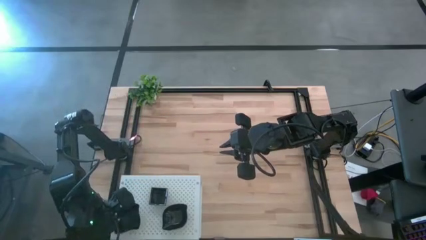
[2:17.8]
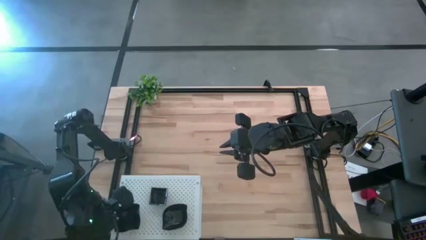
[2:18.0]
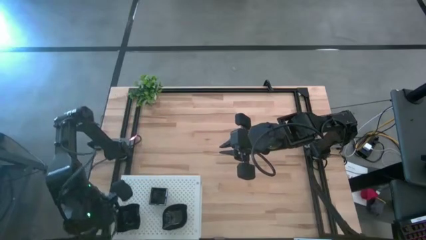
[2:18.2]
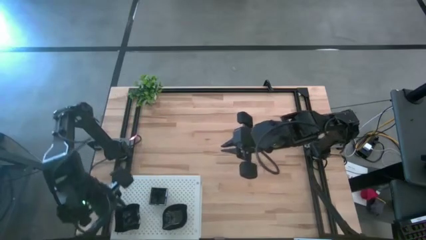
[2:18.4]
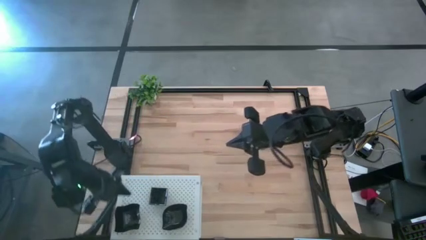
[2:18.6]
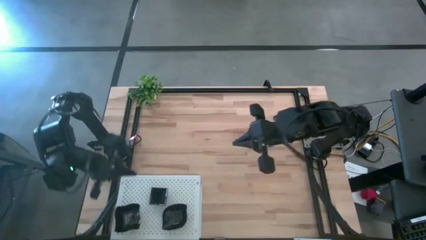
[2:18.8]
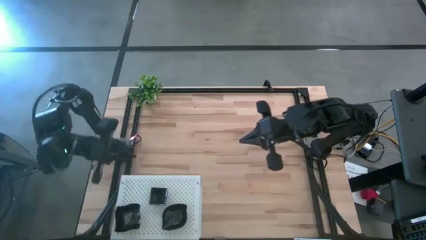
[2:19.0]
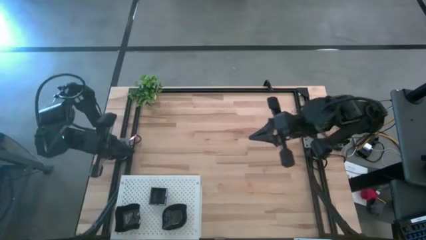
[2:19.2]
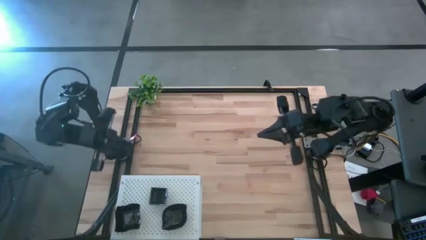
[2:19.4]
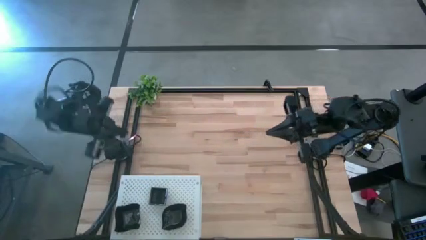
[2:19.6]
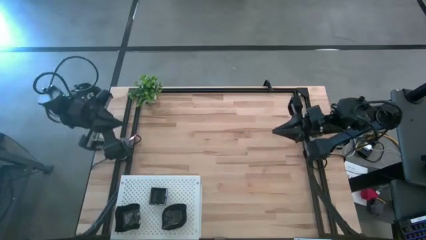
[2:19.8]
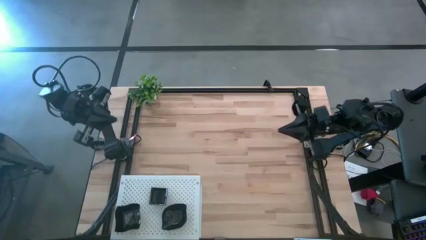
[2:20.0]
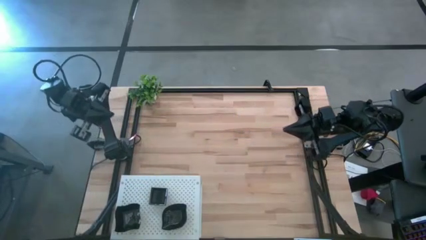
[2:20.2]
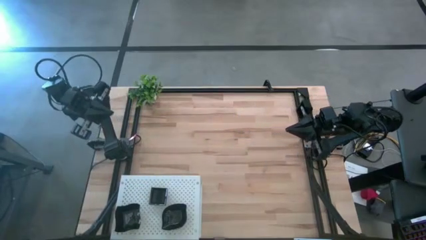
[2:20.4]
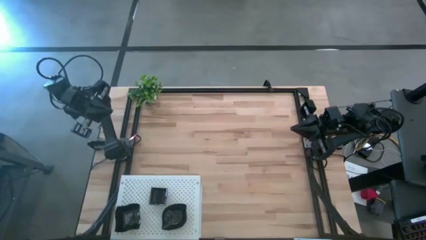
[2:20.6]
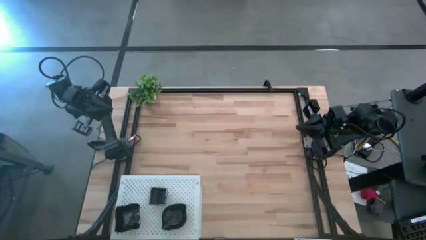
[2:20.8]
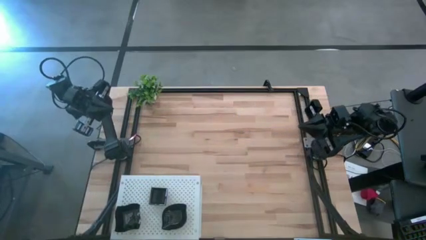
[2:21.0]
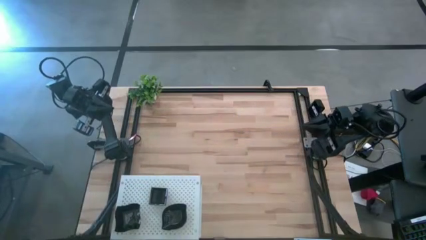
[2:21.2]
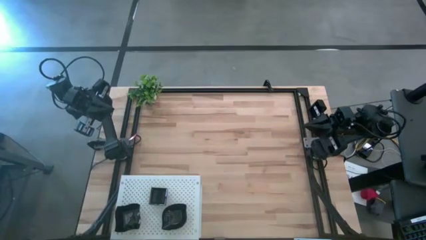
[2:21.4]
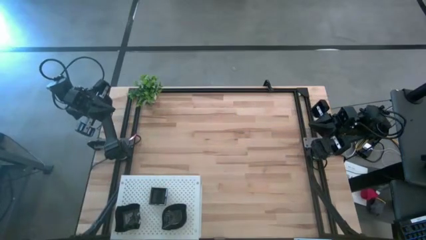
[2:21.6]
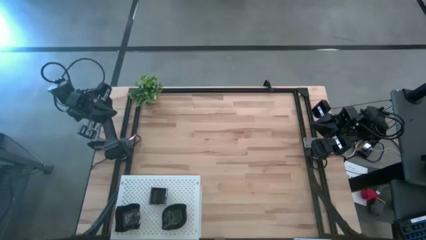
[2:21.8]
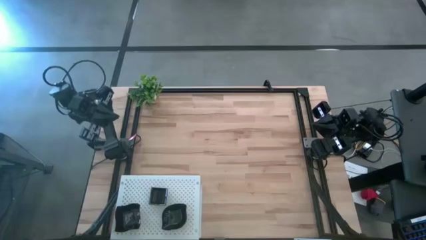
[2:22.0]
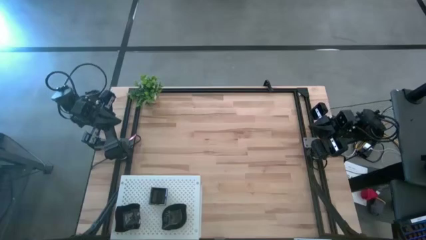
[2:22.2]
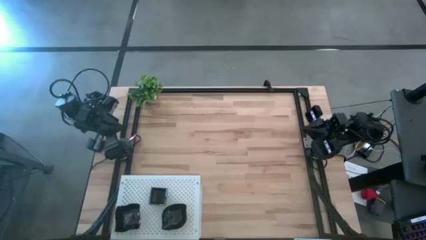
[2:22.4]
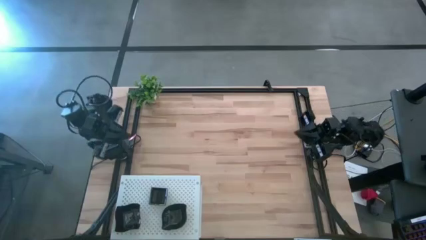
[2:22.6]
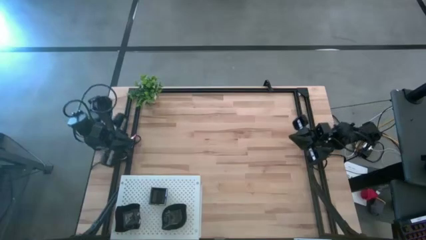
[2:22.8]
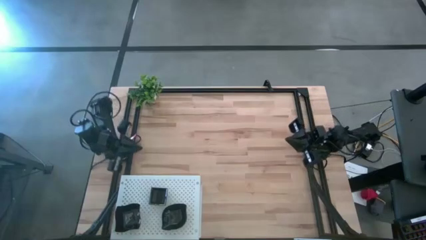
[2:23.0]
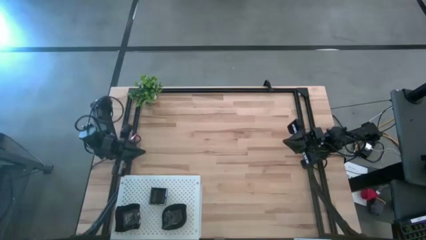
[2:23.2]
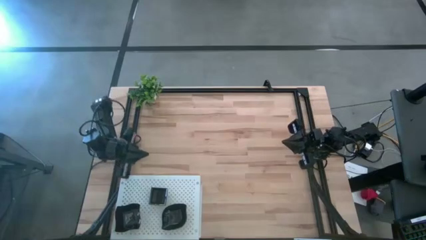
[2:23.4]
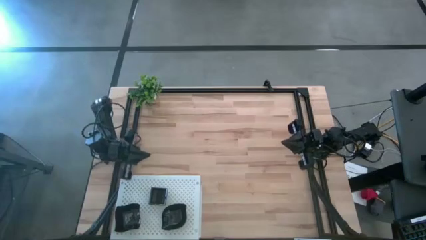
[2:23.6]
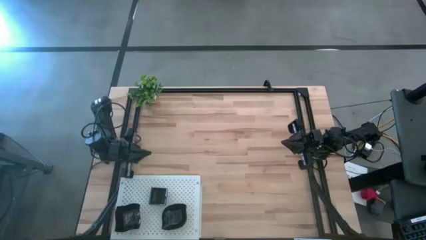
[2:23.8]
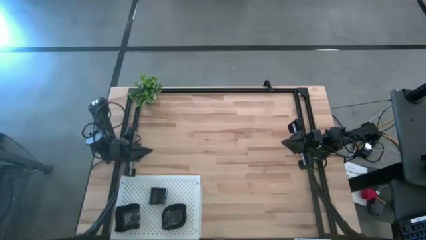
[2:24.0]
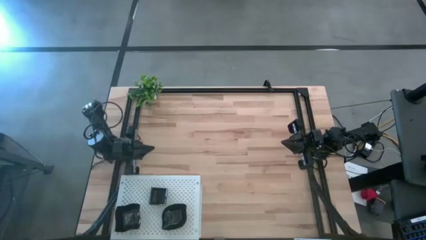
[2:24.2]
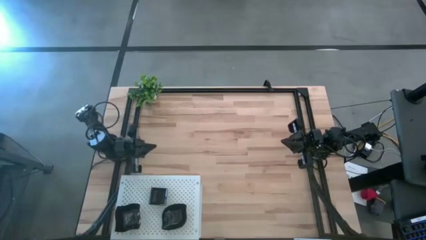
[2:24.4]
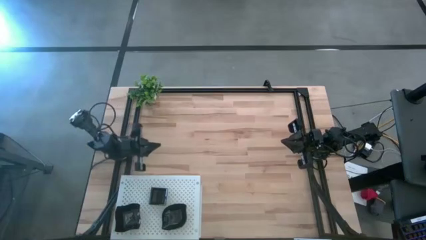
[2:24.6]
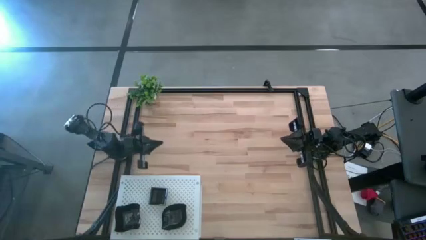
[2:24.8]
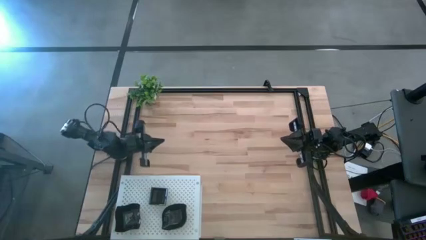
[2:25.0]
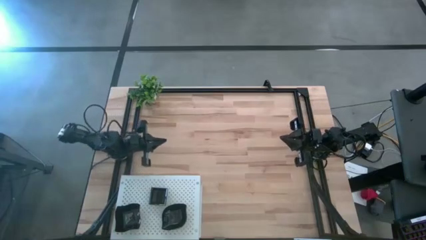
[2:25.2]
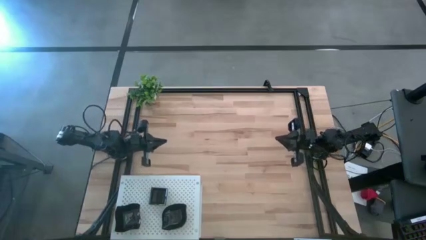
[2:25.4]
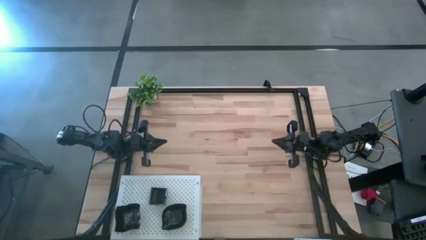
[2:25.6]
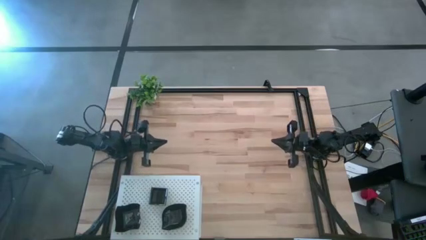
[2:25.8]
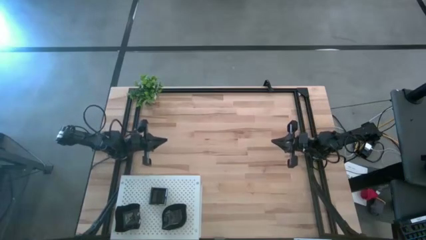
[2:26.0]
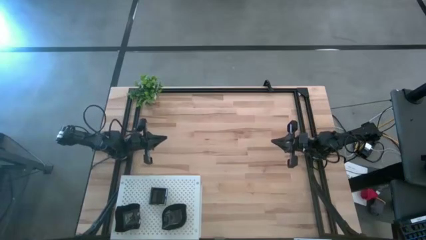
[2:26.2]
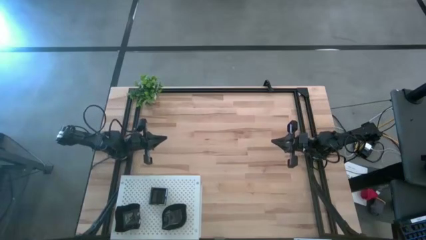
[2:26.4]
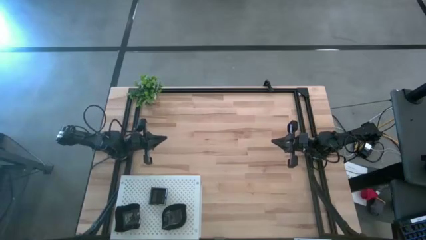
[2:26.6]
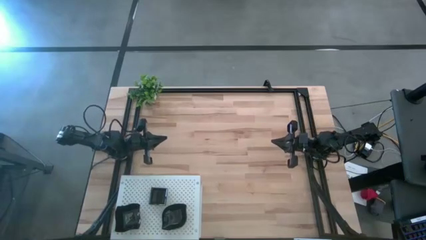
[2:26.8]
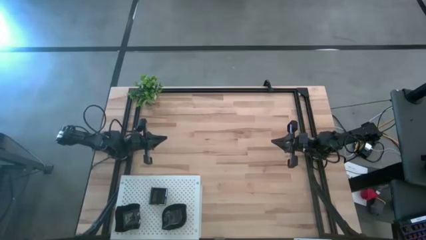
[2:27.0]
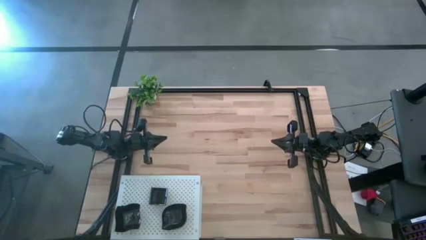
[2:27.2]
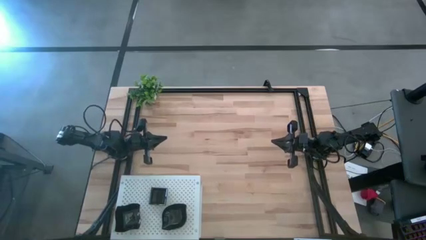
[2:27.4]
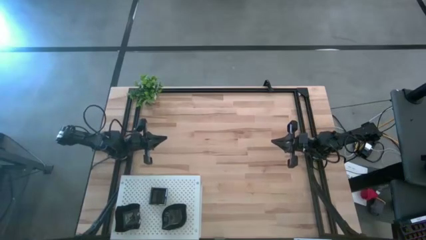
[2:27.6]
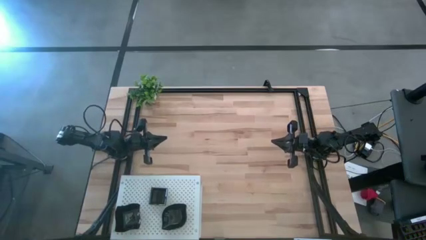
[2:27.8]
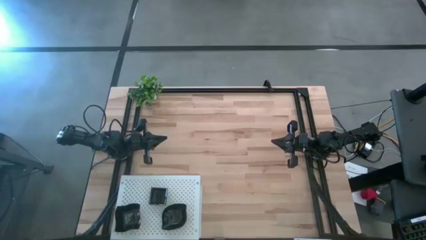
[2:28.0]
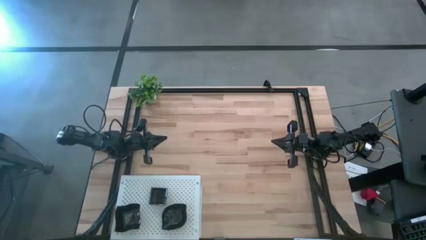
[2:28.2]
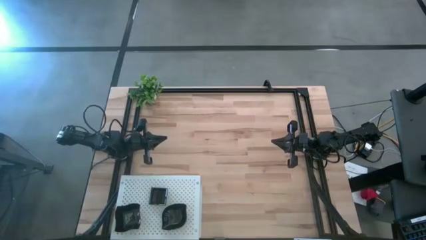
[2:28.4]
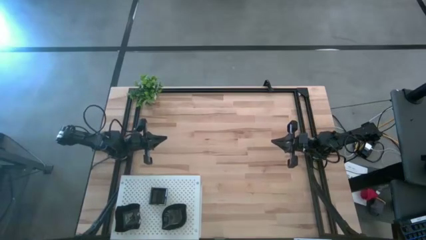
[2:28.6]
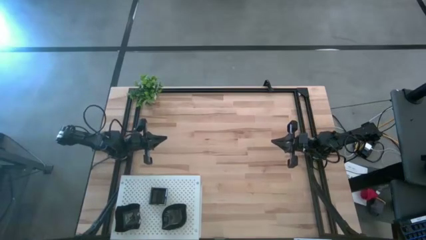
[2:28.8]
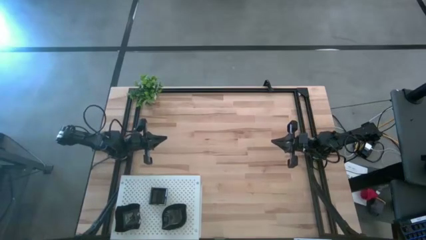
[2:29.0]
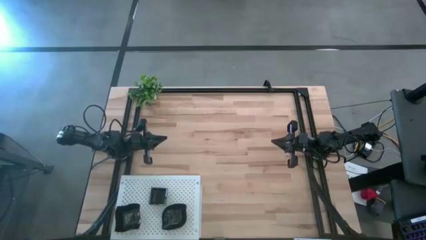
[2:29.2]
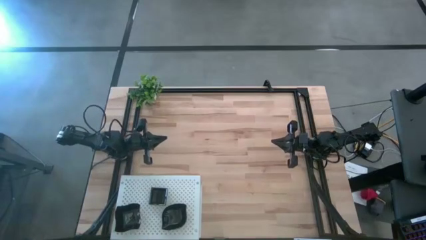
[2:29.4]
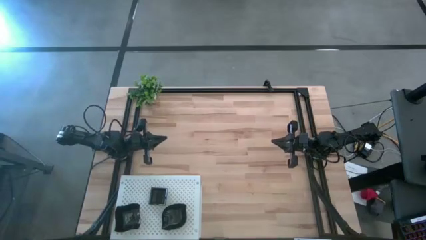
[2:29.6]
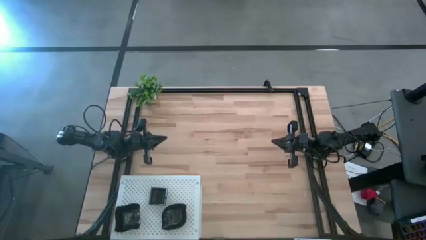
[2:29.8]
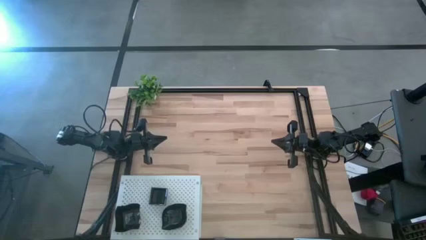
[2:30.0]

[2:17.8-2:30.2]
Task: Pick & Place Mini shaped plates
Return to Home Position
